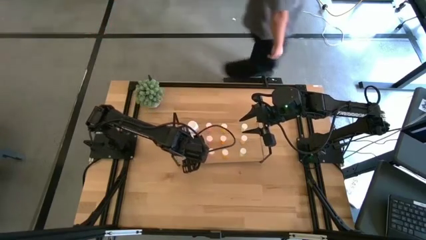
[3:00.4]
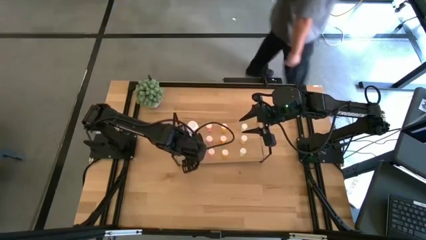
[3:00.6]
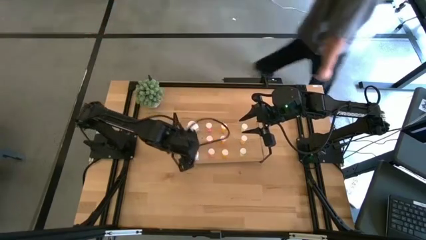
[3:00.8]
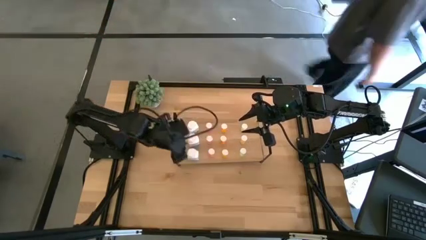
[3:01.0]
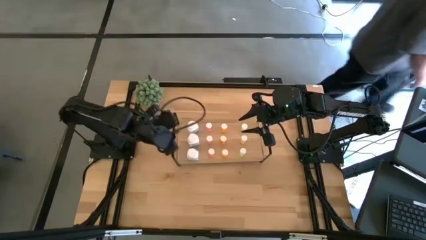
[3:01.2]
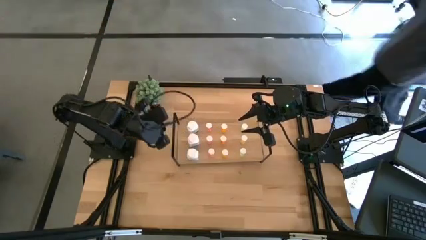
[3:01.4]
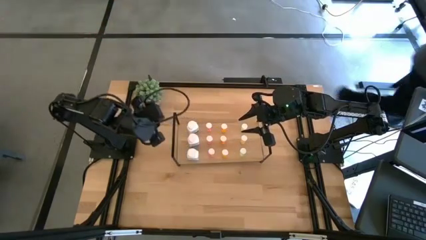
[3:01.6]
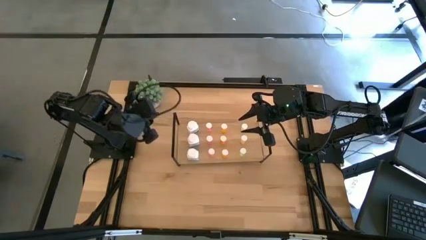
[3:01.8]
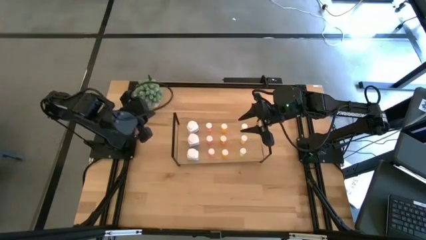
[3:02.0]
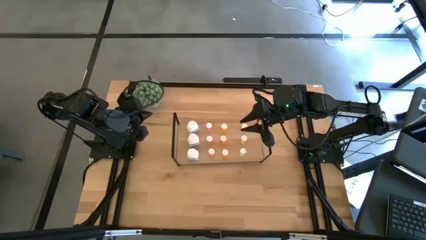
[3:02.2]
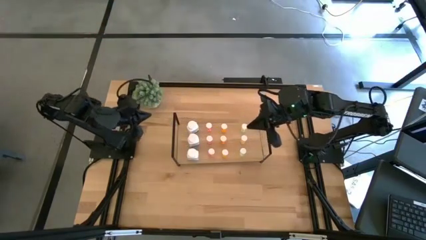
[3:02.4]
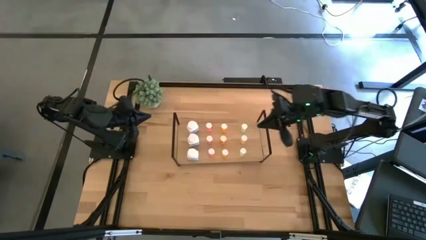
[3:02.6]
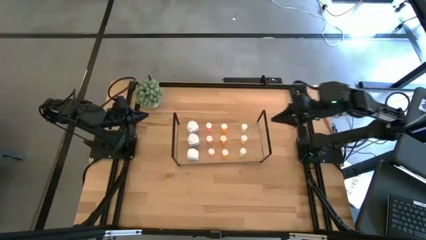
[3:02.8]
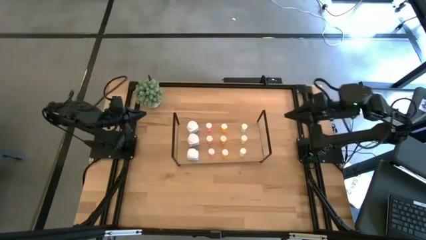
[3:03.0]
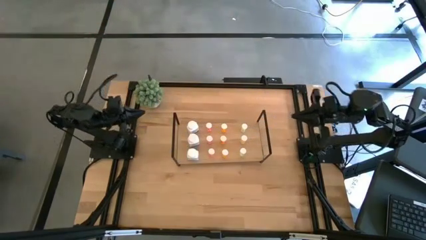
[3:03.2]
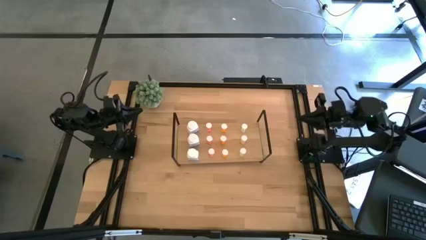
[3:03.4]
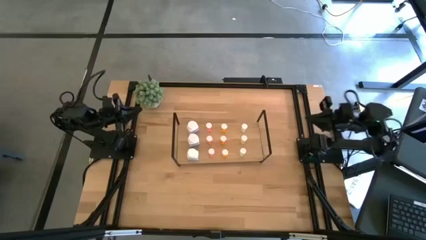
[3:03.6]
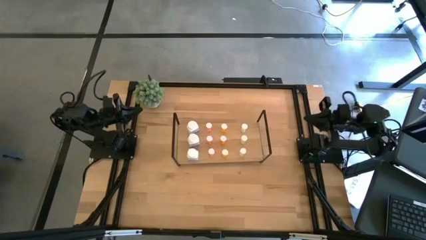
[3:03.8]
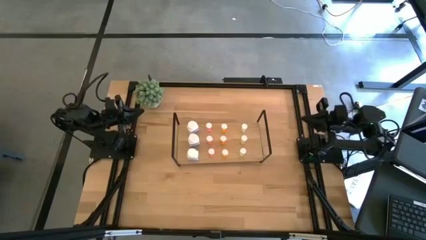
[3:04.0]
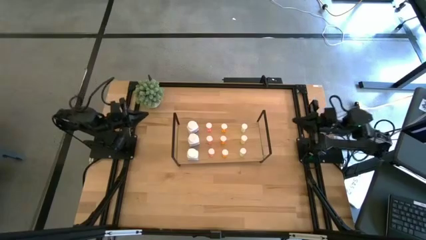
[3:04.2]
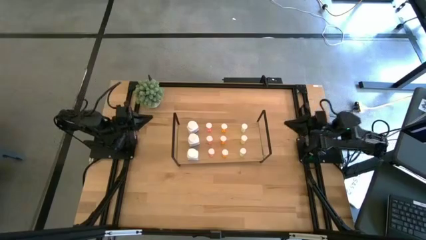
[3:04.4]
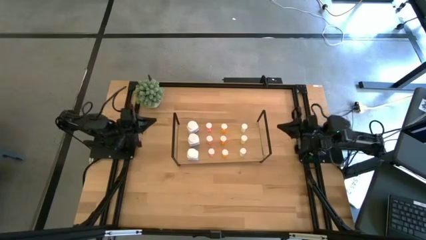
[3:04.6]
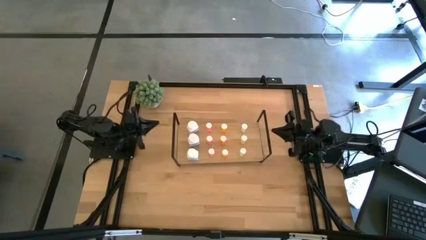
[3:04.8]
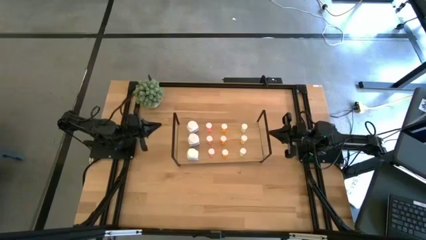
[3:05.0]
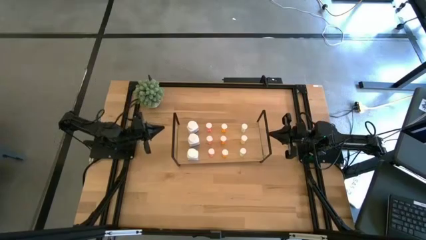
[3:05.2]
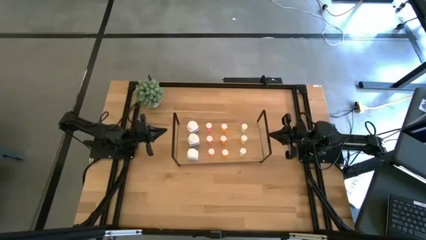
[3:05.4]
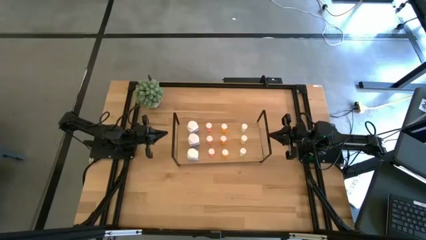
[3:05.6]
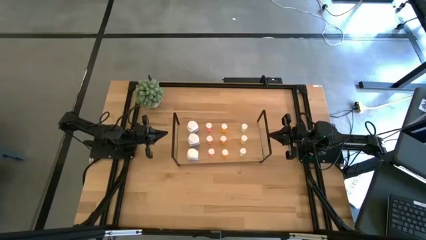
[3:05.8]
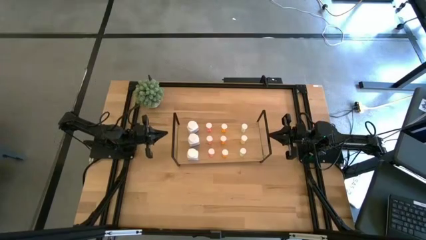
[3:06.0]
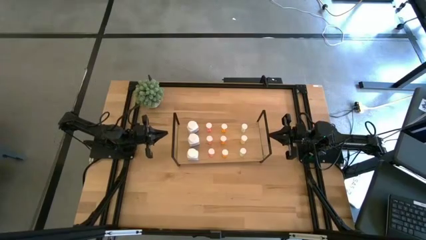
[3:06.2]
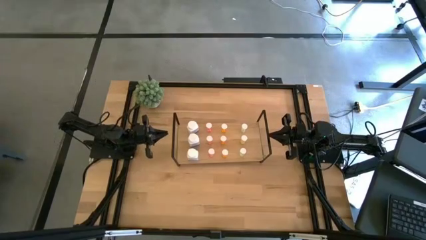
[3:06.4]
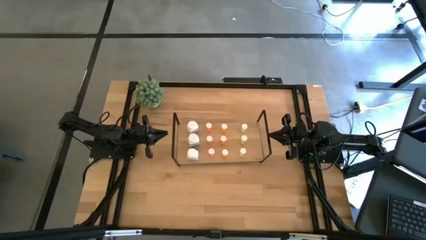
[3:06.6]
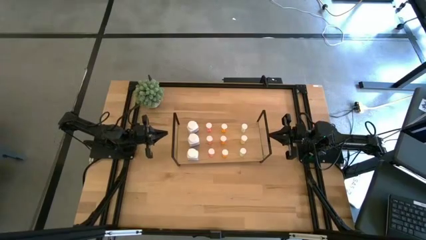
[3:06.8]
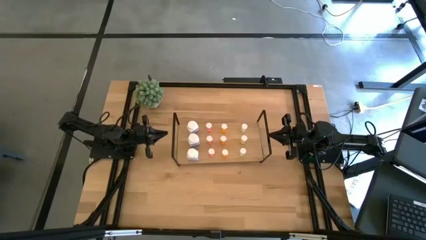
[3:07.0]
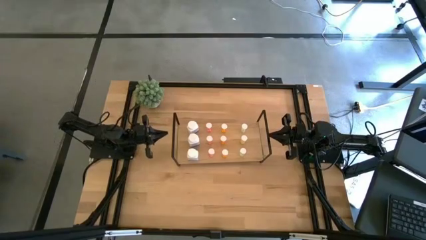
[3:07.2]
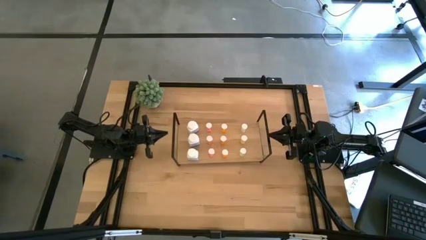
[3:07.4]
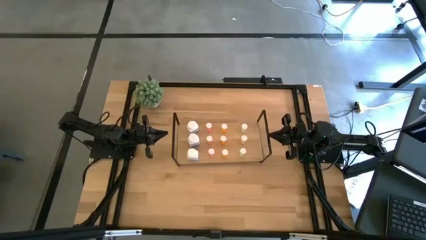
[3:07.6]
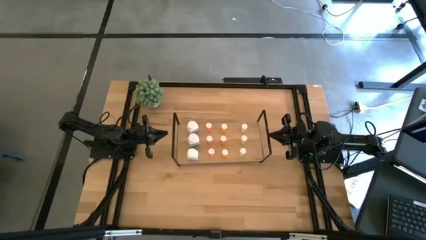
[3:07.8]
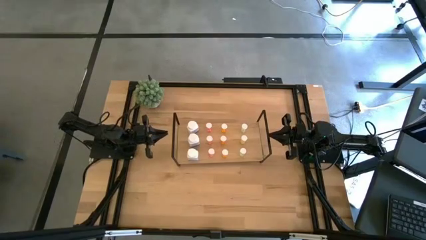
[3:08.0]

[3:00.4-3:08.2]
Task: Pick and place medicine bottles onto shelf by color
Return to Home Position

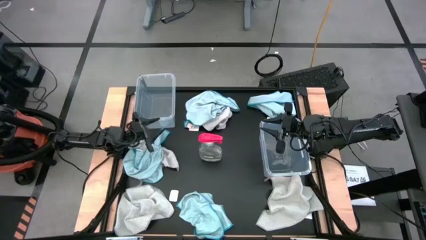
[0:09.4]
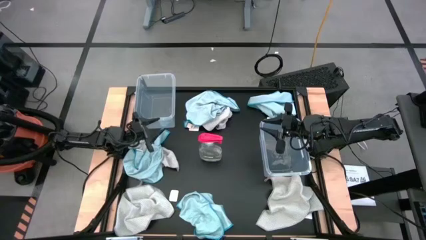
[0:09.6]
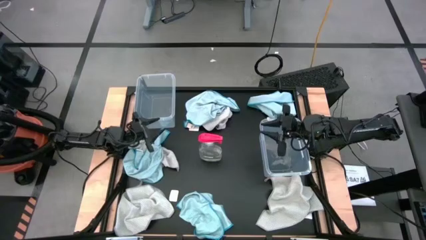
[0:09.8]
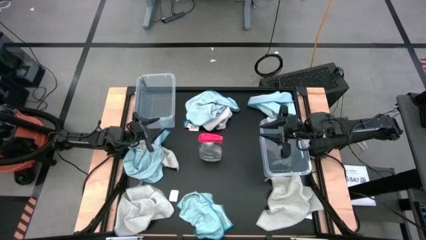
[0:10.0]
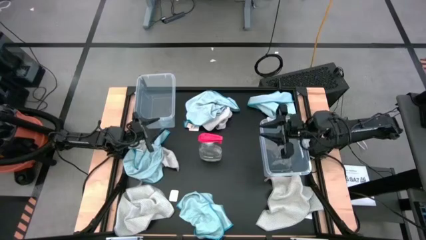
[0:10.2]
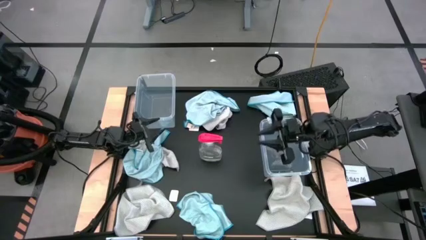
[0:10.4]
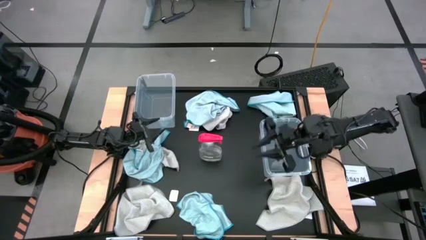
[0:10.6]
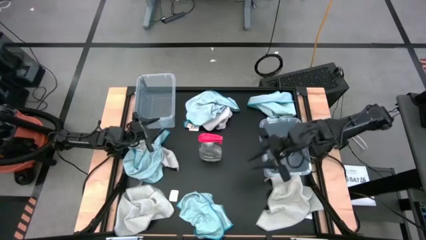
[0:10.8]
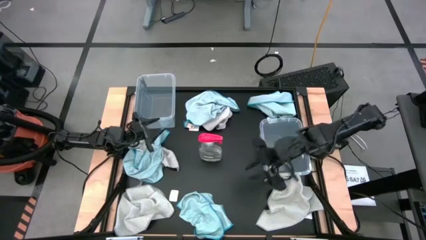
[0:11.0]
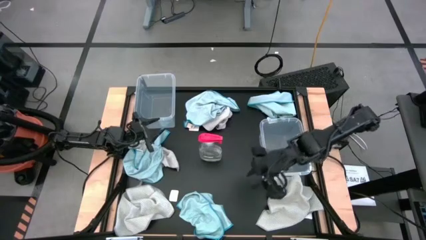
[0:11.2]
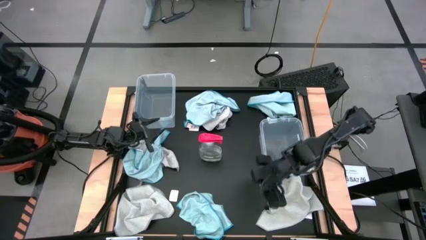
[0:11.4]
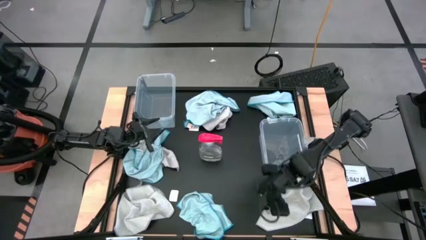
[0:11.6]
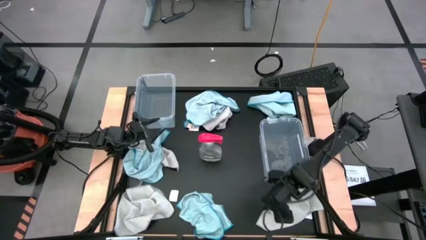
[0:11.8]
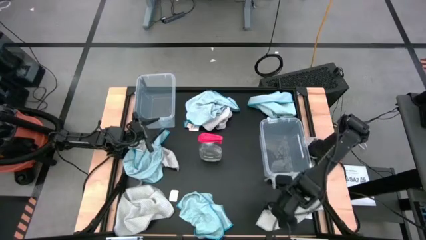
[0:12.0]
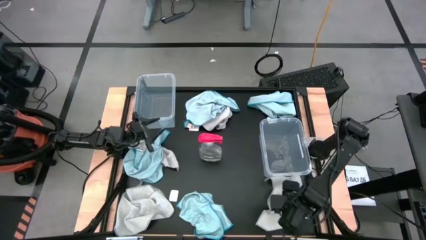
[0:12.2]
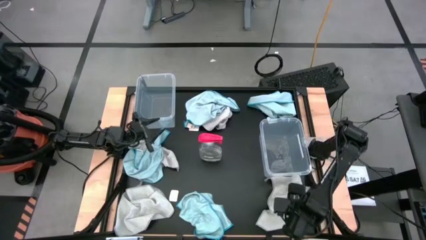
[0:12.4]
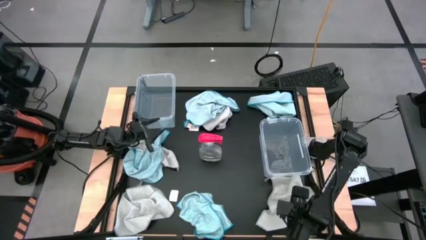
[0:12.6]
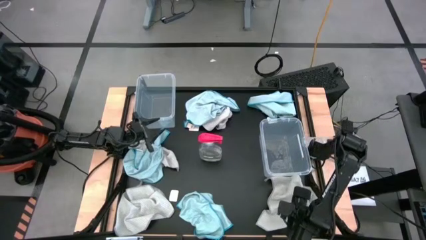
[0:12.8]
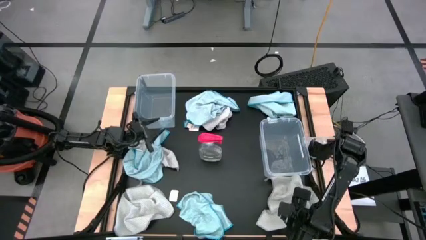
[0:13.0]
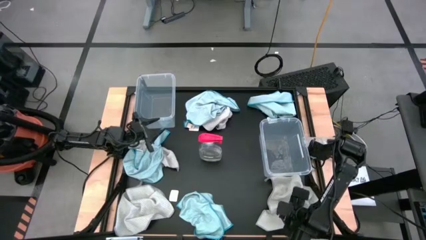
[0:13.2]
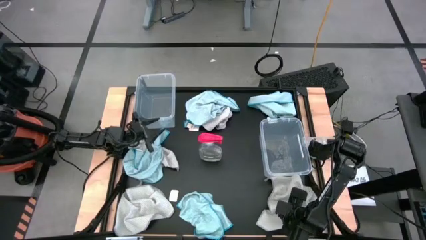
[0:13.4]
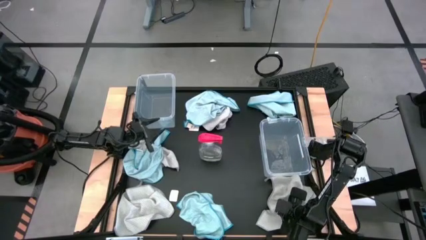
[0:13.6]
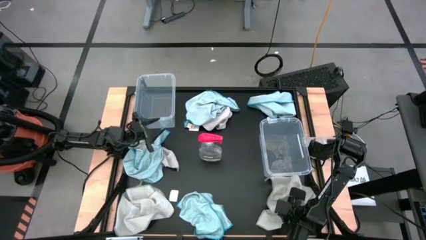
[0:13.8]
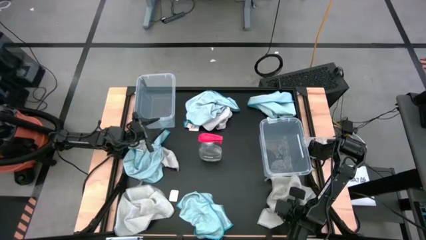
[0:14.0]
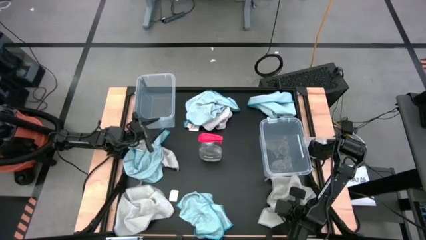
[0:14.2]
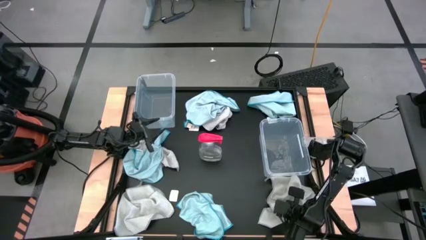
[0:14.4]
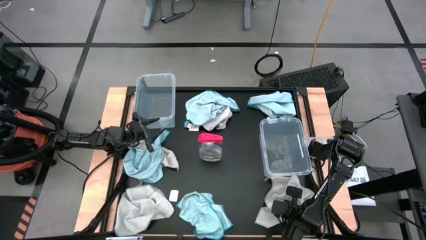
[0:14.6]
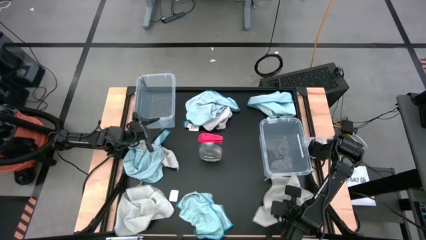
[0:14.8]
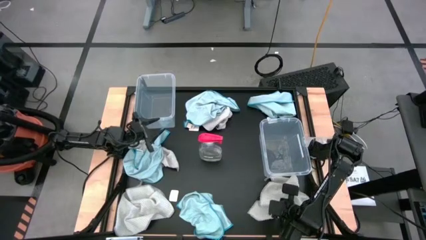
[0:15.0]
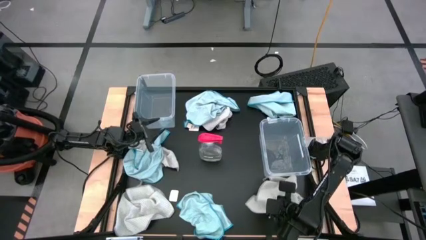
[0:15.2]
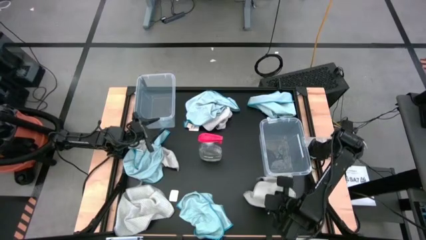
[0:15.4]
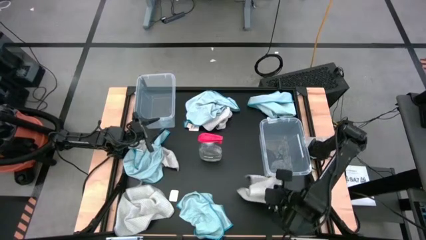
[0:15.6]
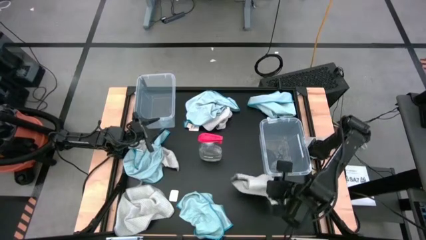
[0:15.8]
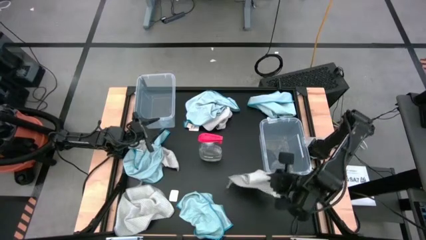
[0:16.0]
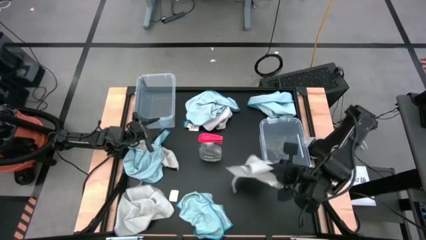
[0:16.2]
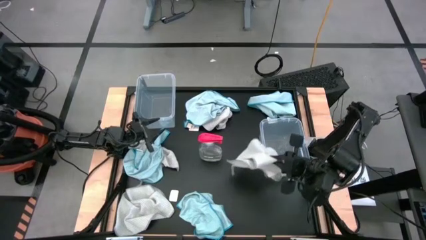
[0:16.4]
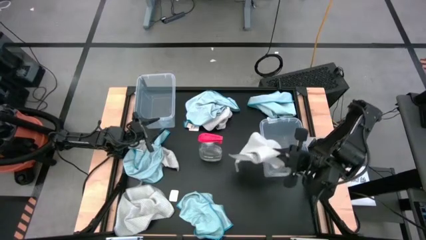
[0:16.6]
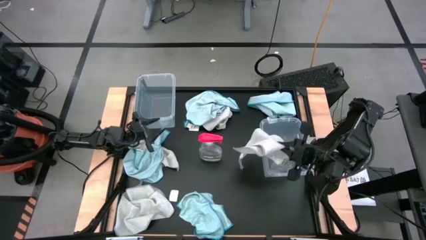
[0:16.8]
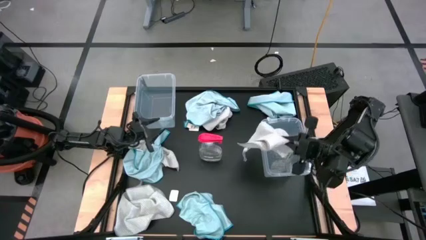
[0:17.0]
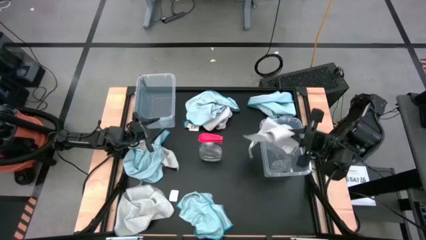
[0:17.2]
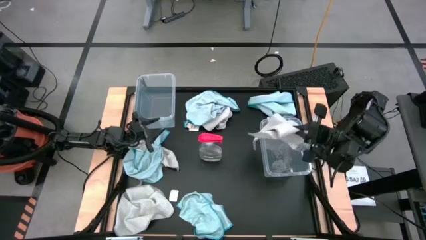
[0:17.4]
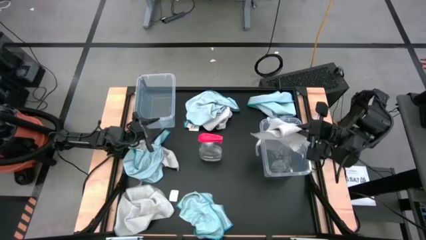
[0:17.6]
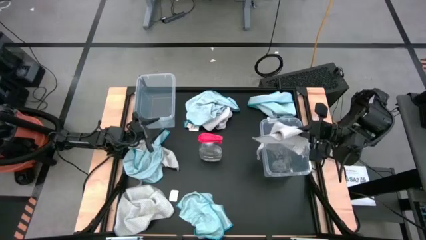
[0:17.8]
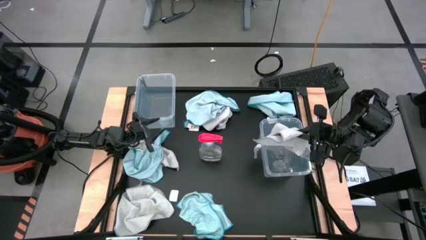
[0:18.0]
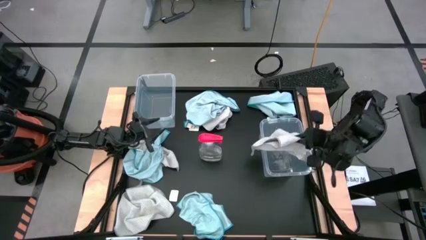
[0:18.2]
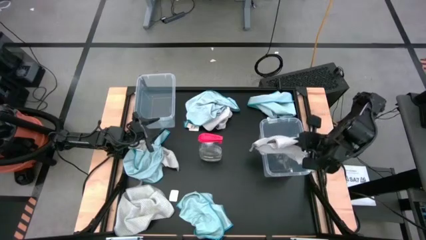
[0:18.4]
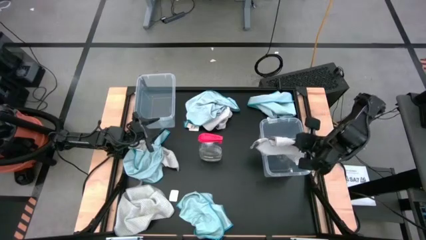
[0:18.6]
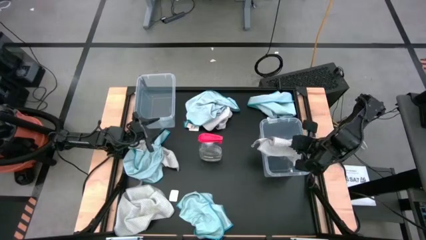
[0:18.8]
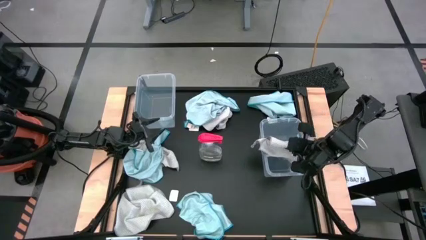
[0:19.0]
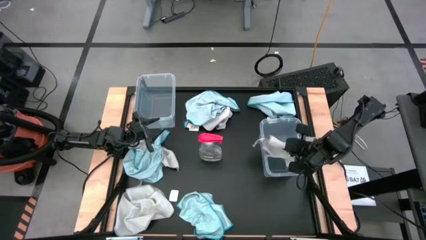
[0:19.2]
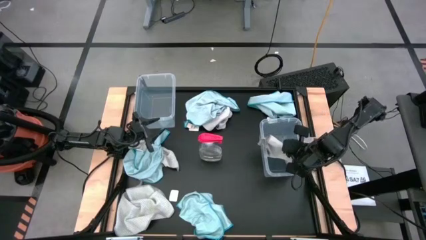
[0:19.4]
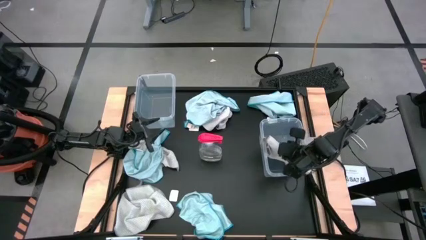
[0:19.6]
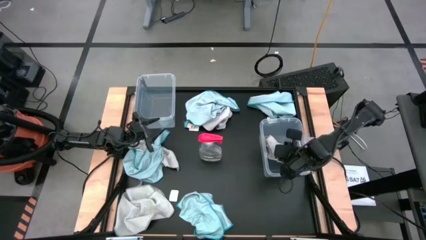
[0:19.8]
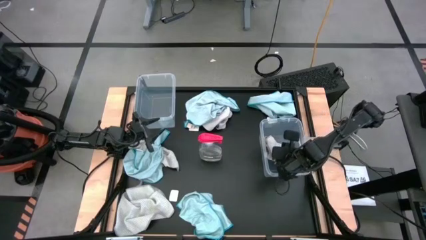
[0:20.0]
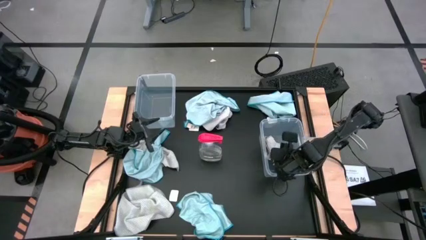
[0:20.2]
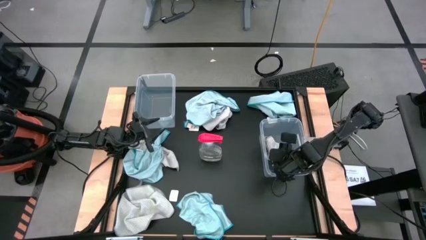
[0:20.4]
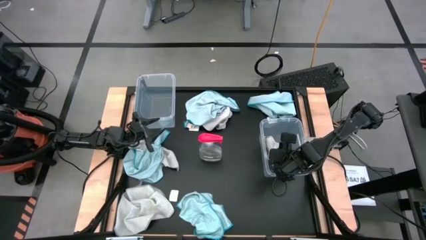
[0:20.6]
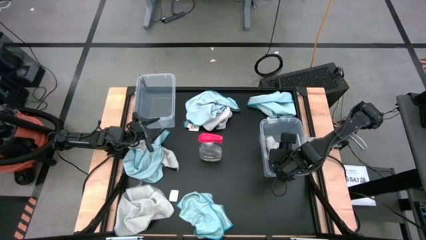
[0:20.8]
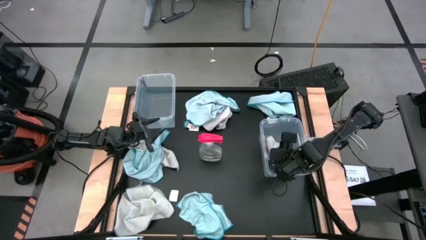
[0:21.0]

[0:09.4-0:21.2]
Task: Sort microfiber towel by color & place in baskets
Put the bottom right gray towel into the right transparent bin
